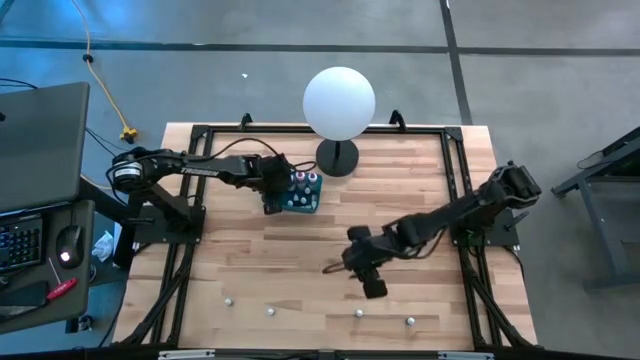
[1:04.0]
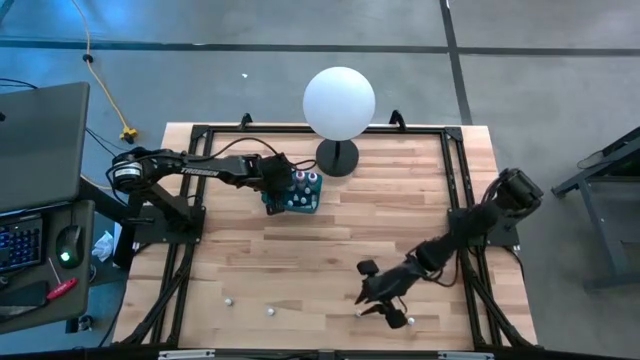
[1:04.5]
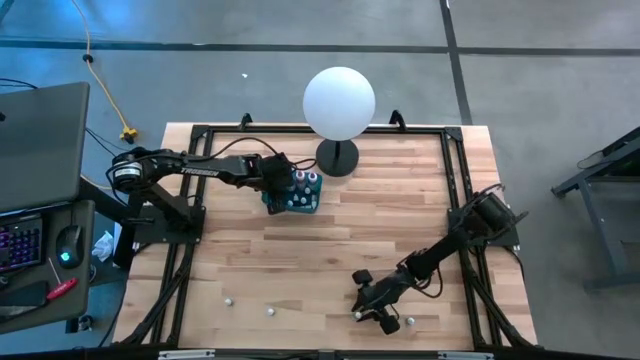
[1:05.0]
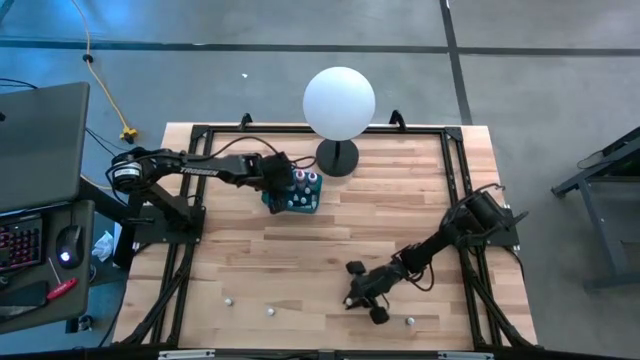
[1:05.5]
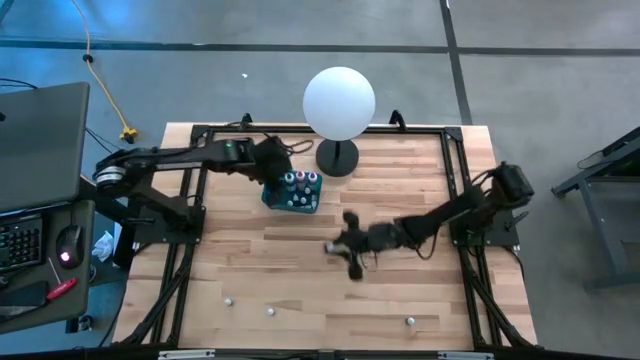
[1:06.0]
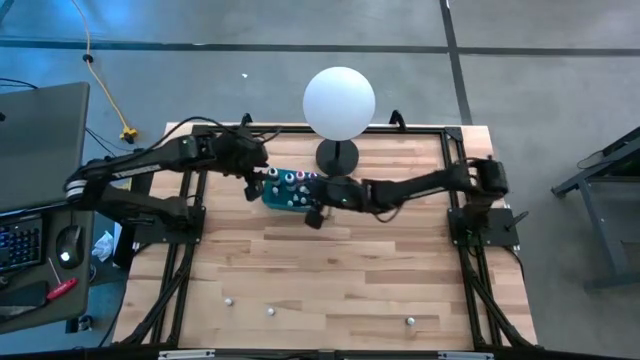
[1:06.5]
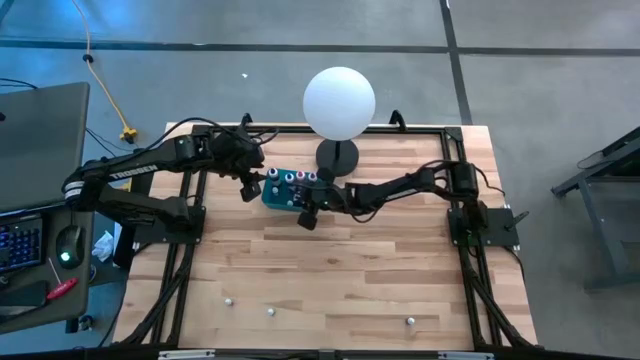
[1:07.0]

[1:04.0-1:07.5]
Task: Pick & Place food coloring
Put the small purple food coloring bottle into the blue bin

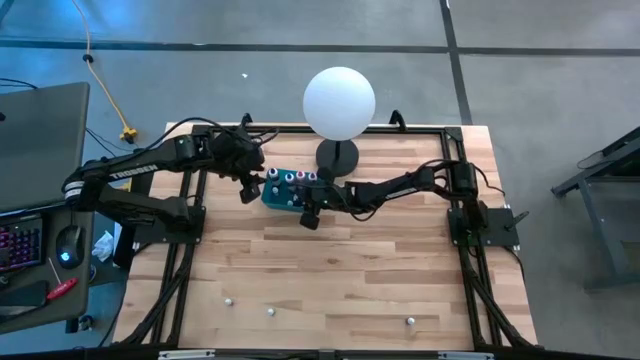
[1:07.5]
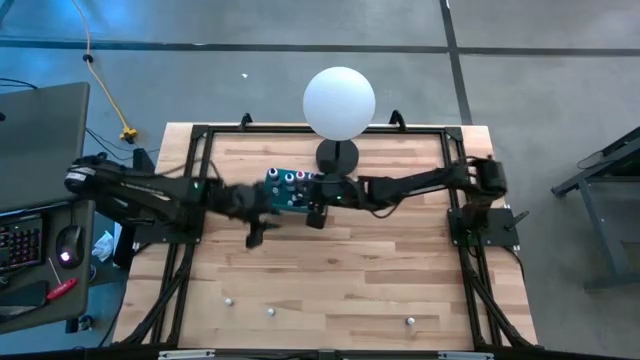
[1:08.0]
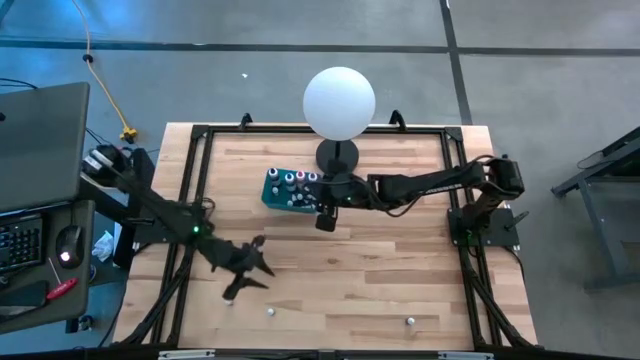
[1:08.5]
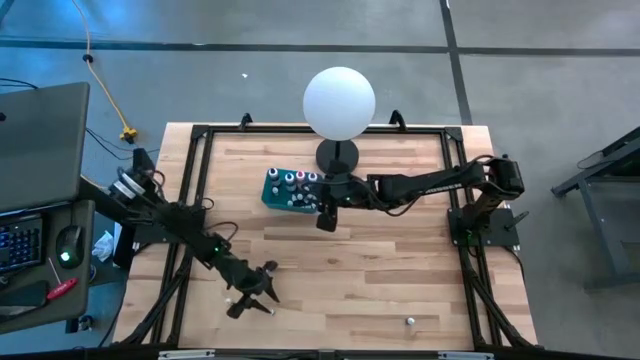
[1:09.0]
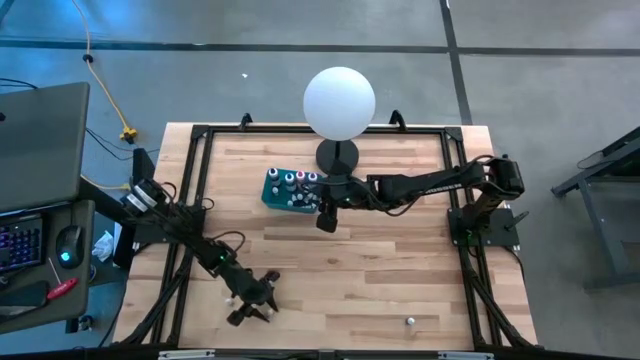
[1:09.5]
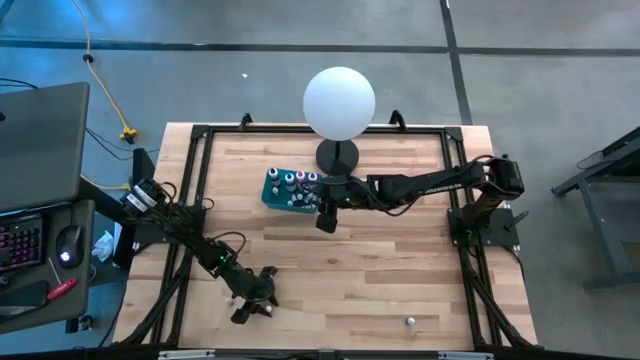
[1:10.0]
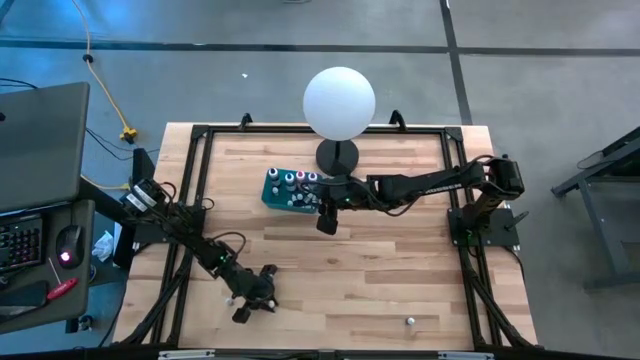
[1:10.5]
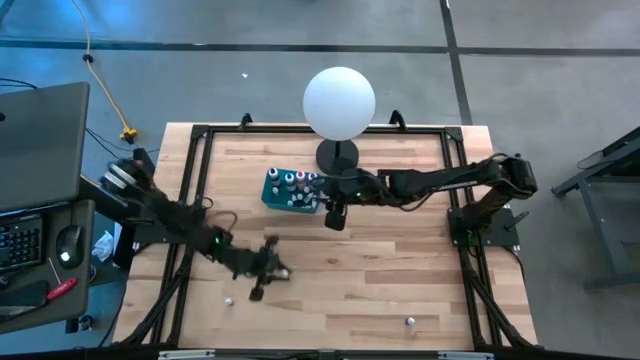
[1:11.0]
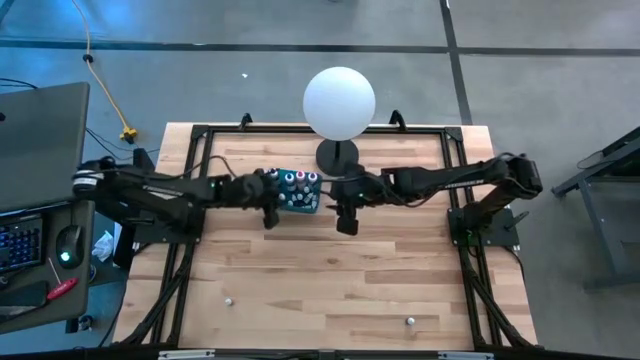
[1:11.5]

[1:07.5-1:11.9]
Put the small green food coloring bottle into the blue bin

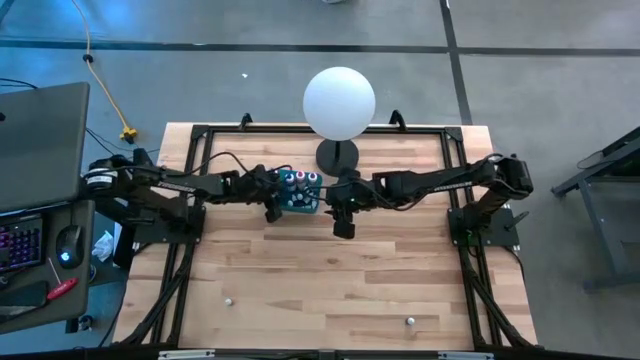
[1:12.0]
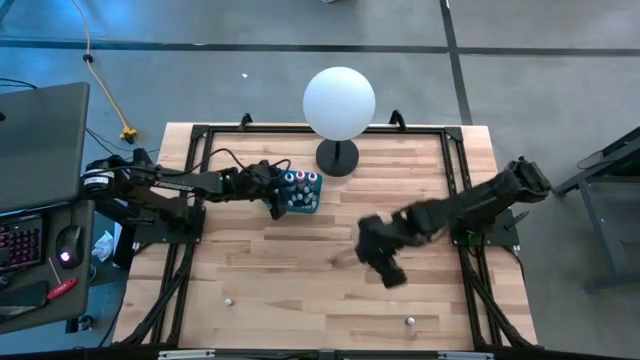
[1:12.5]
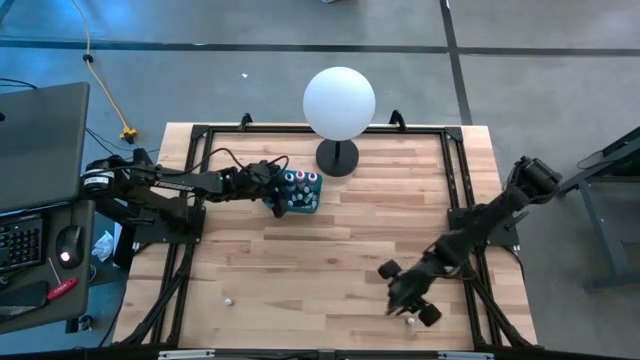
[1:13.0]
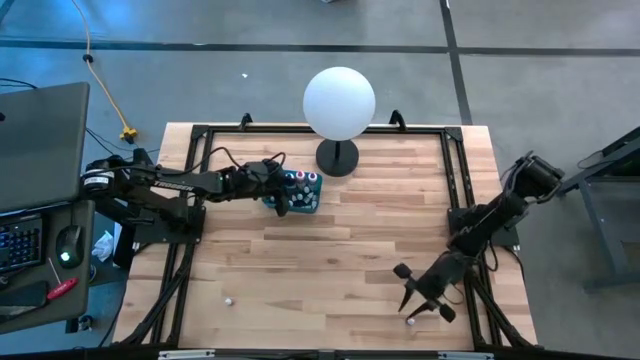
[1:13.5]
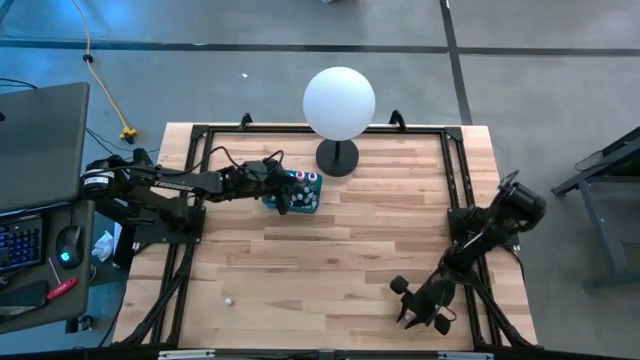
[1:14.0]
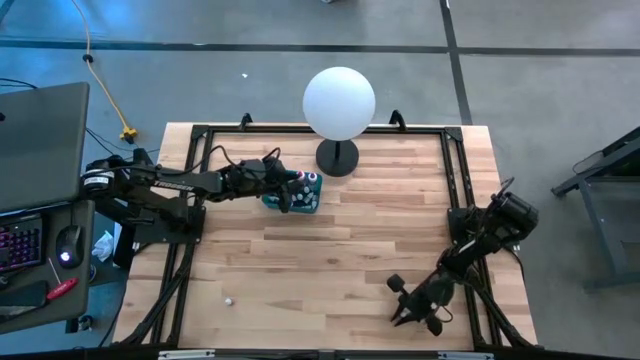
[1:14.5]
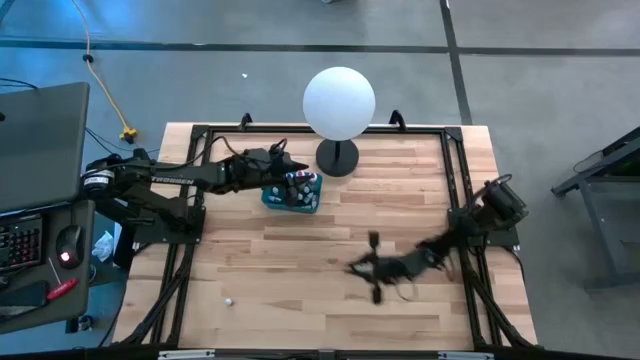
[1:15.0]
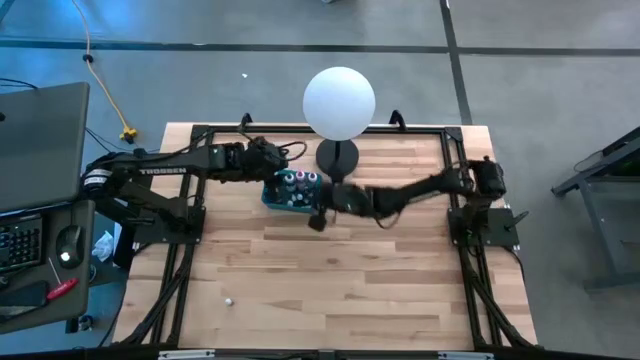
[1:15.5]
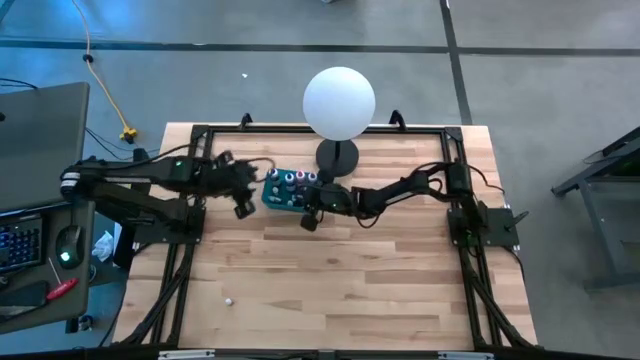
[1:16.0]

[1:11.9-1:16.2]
Put the small green food coloring bottle into the blue bin

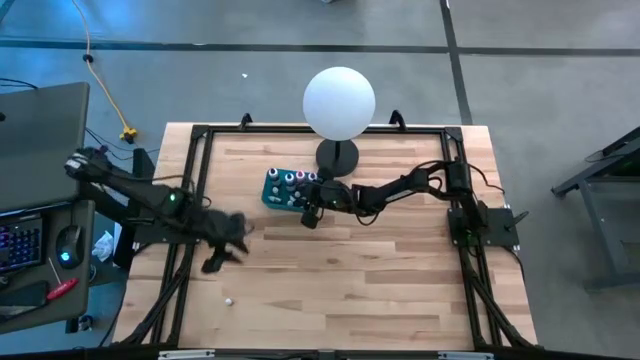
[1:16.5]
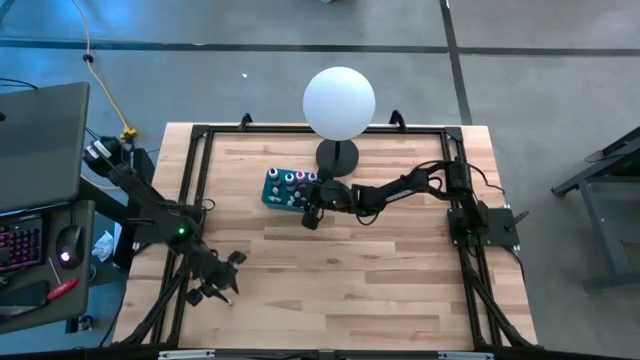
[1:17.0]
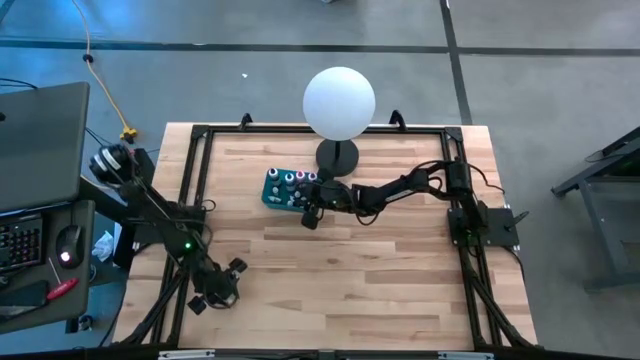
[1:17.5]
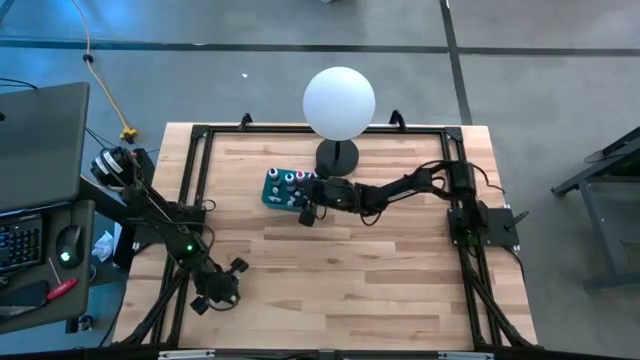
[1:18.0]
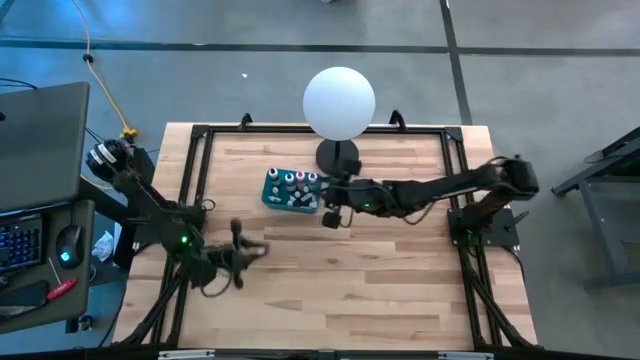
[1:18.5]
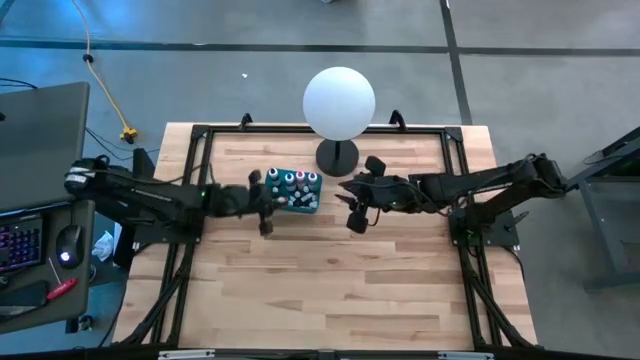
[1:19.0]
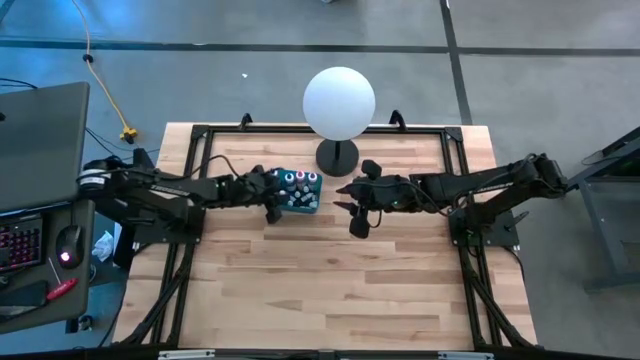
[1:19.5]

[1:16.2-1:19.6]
Put the small red food coloring bottle into the blue bin

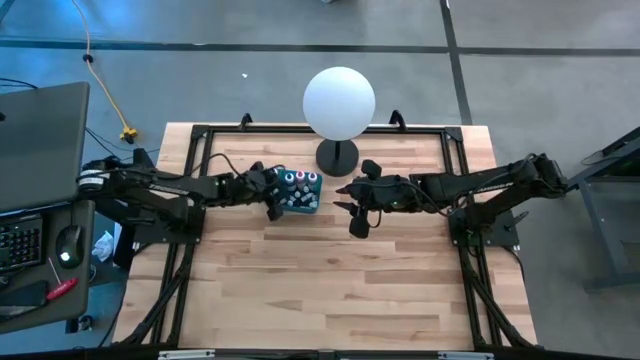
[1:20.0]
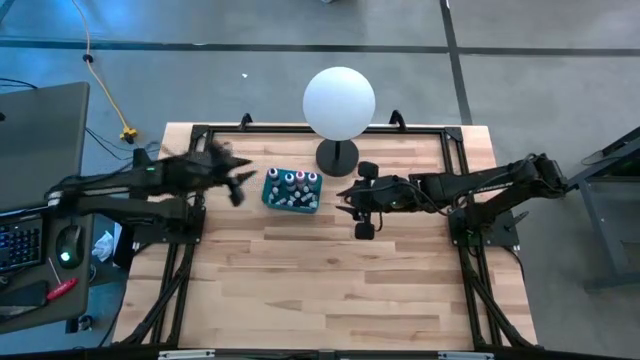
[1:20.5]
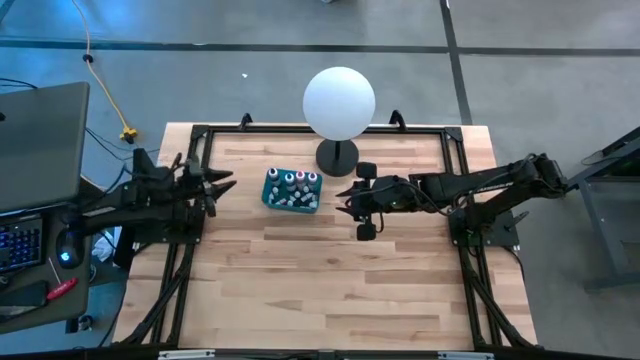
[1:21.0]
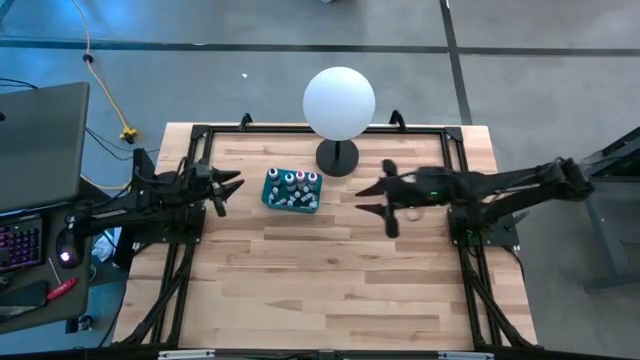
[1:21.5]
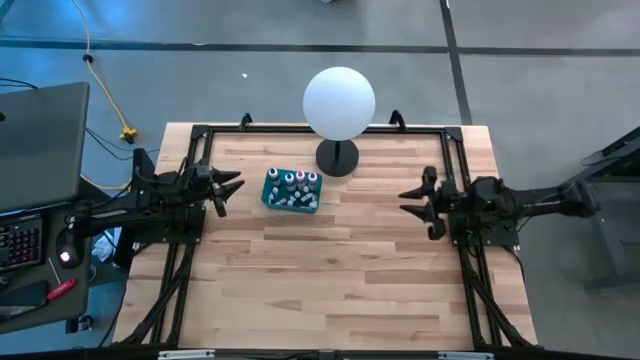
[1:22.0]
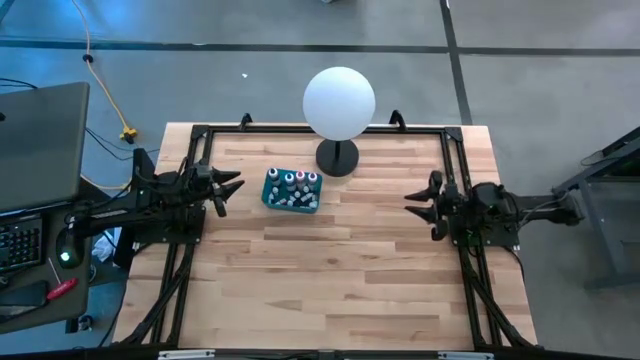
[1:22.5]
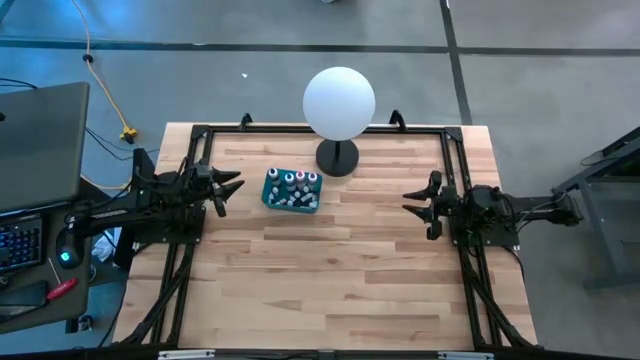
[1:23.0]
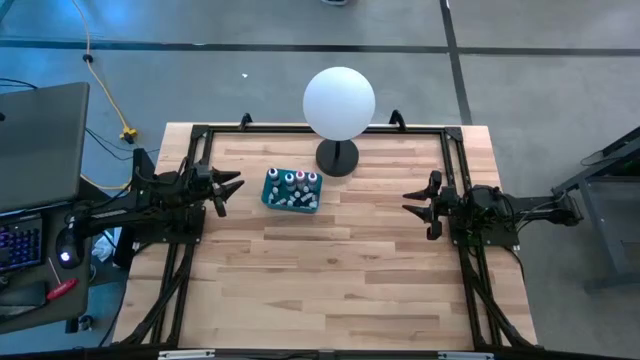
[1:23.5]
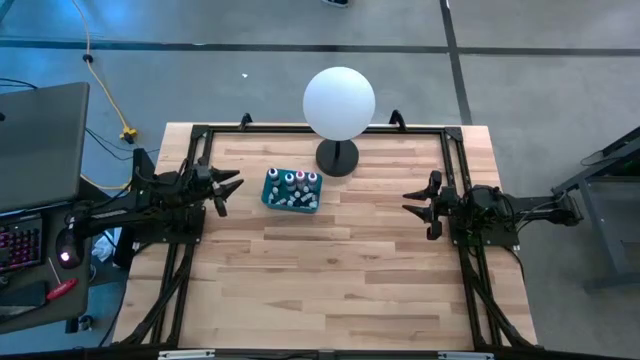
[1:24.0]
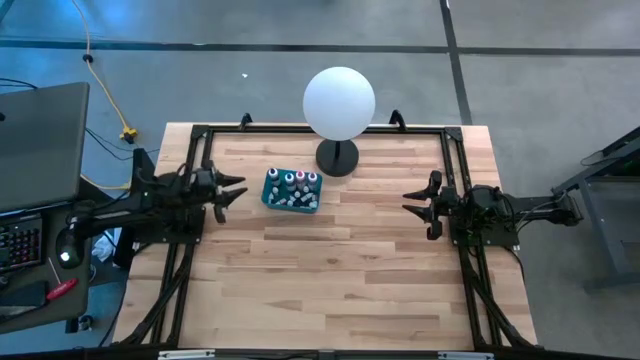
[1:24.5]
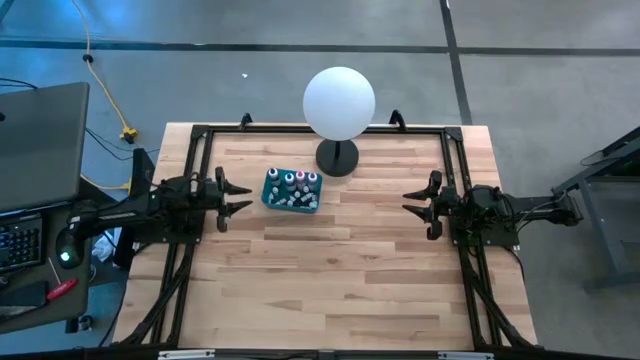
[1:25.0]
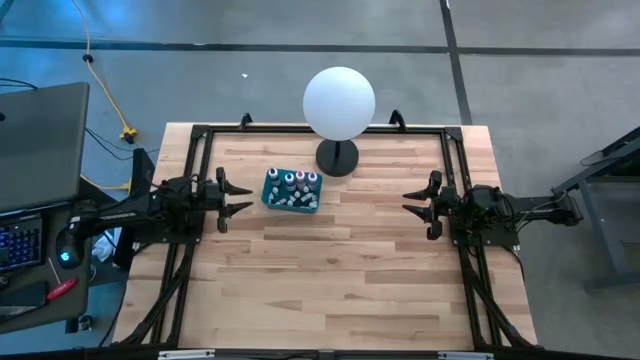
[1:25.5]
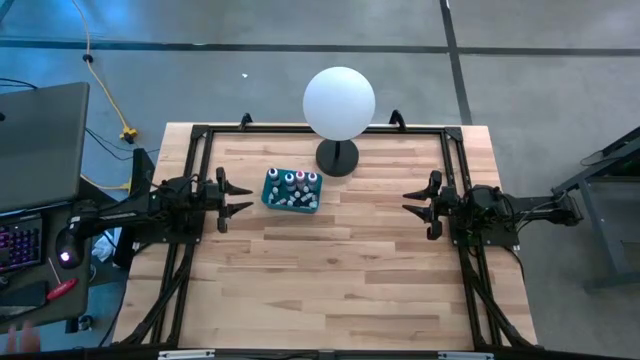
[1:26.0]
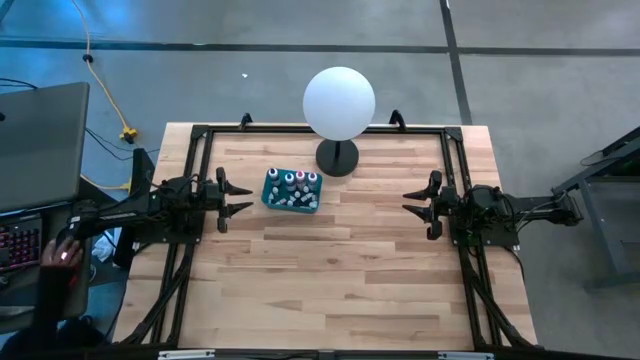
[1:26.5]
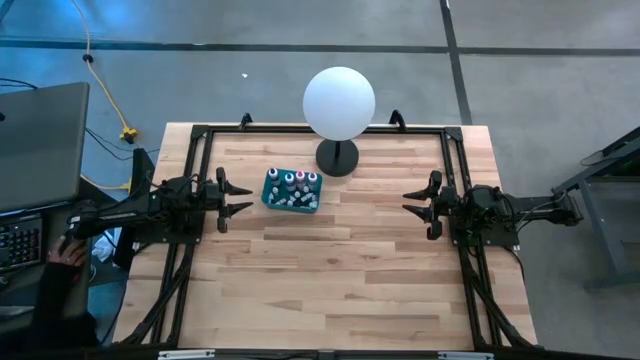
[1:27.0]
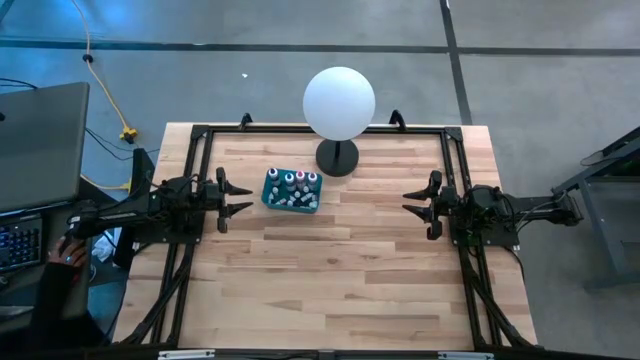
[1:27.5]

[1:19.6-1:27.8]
Return to Home Position
